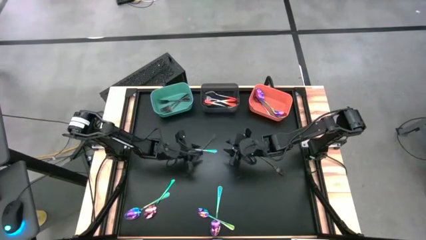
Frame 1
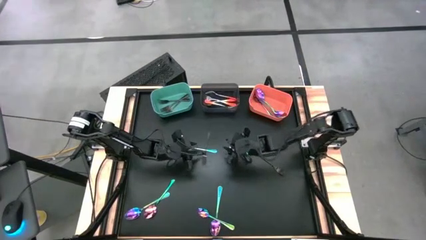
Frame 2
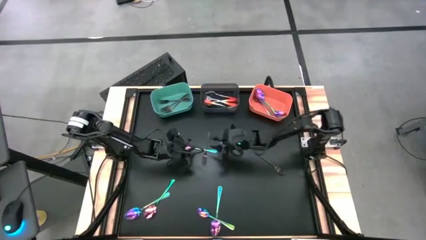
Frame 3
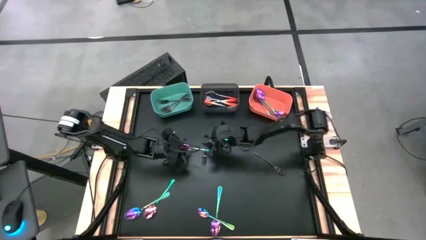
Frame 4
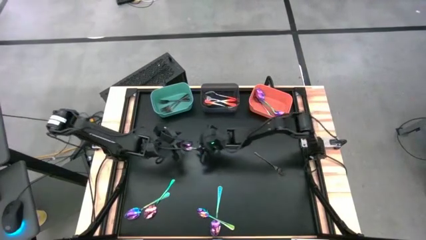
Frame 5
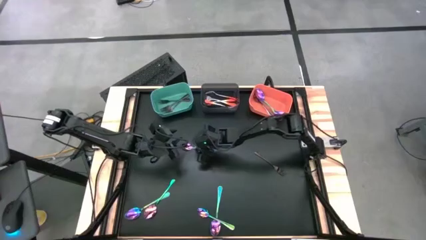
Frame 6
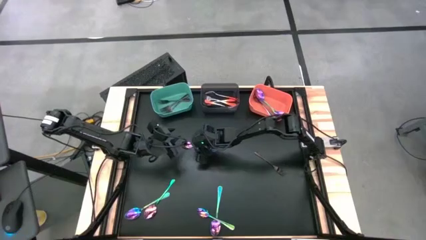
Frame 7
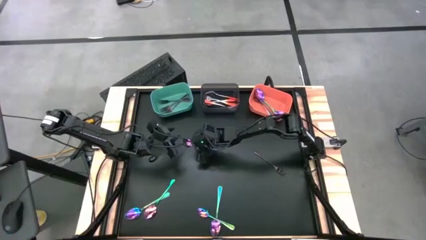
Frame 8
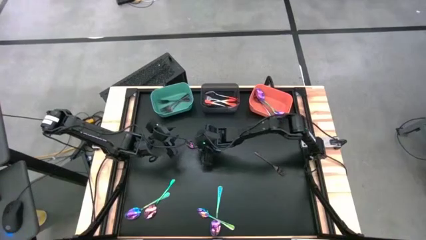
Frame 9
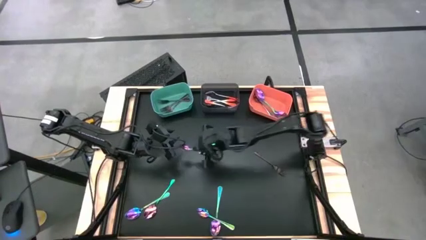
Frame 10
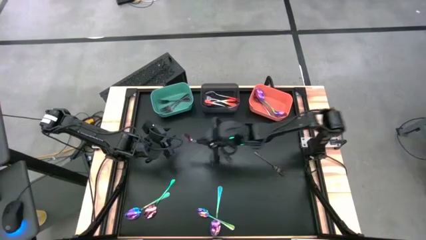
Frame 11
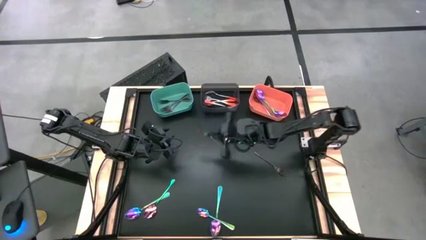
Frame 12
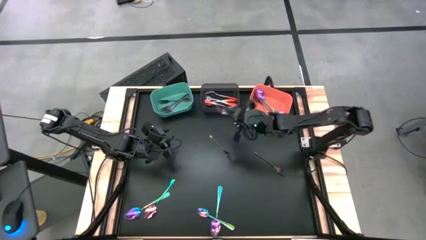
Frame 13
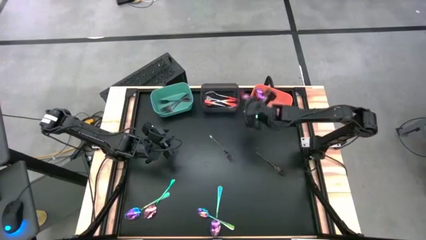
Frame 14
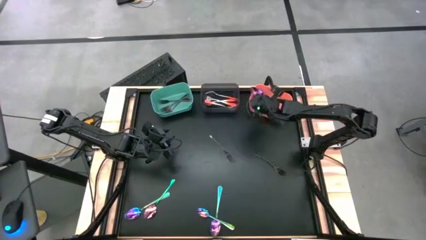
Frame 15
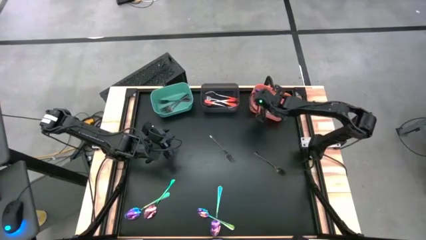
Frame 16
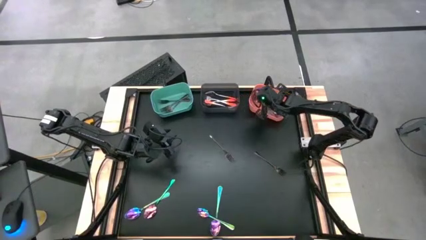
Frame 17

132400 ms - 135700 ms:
Task: Sort silverware by color (type)
Put the blue spoon into the orange bin

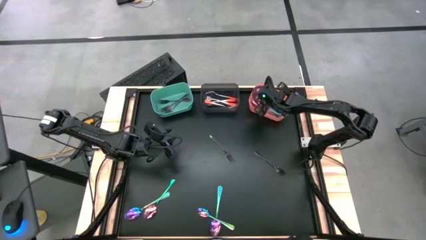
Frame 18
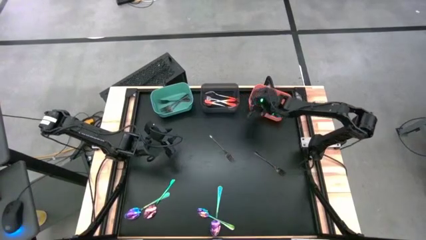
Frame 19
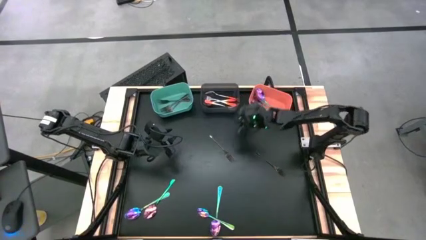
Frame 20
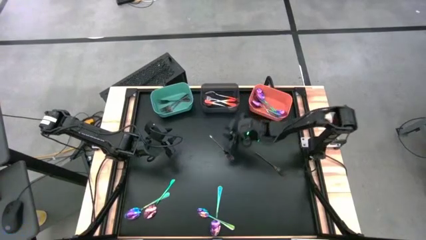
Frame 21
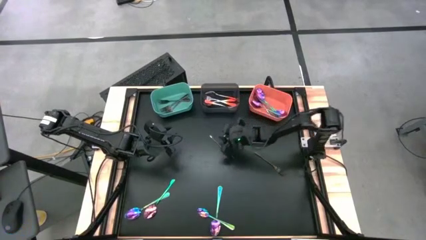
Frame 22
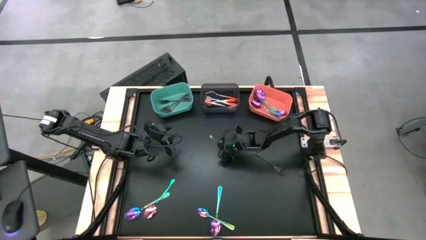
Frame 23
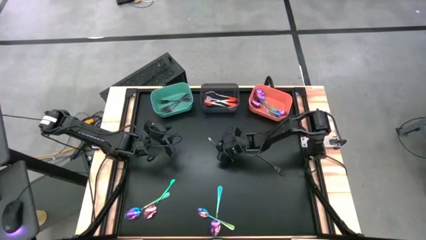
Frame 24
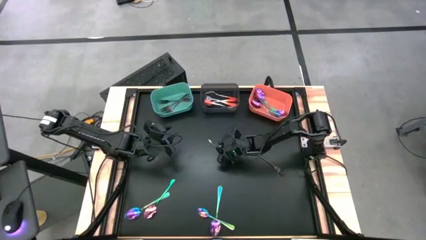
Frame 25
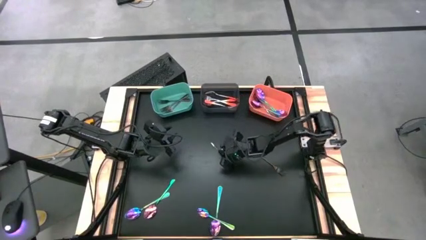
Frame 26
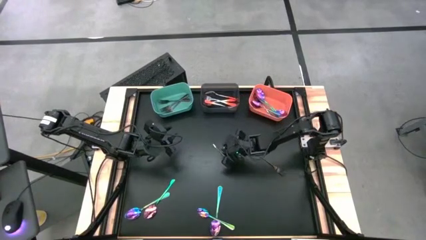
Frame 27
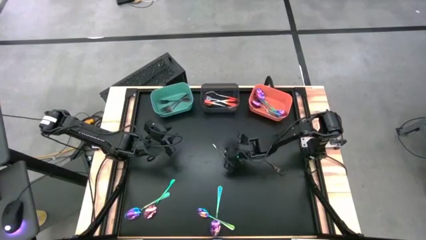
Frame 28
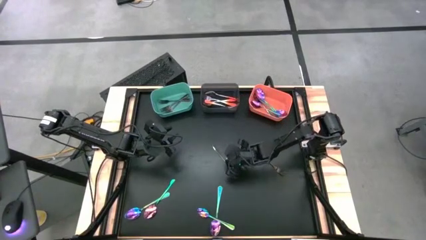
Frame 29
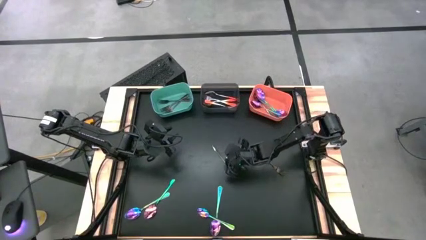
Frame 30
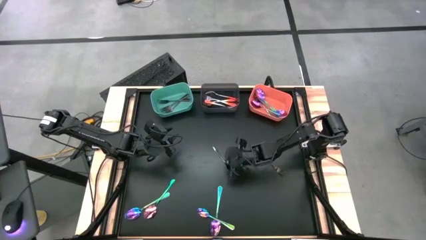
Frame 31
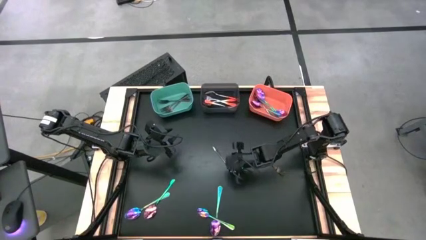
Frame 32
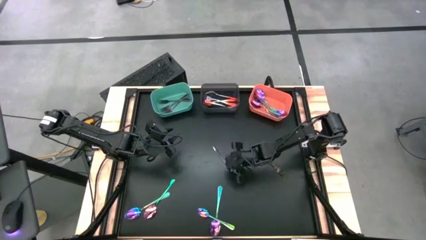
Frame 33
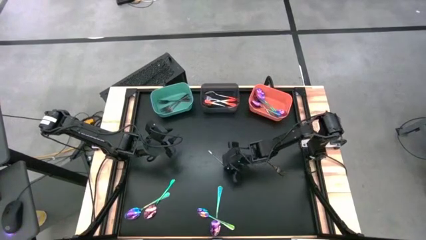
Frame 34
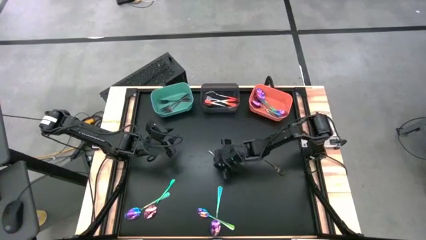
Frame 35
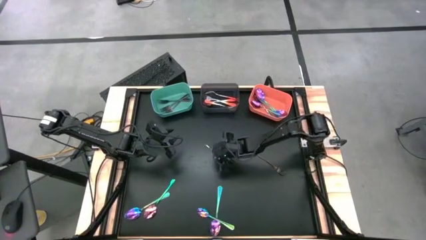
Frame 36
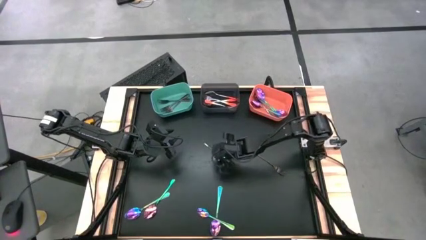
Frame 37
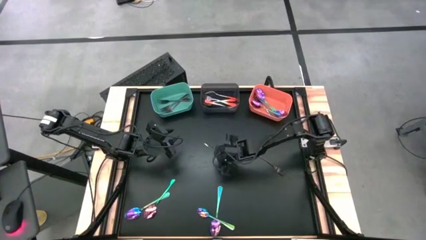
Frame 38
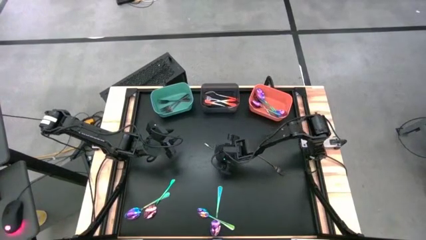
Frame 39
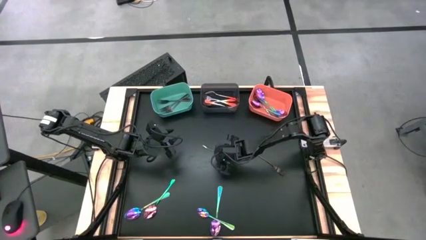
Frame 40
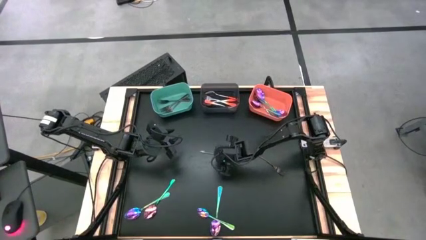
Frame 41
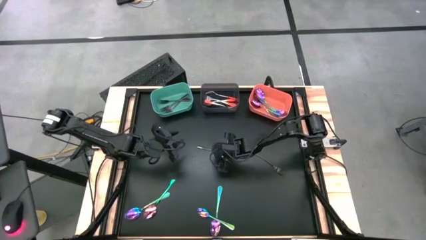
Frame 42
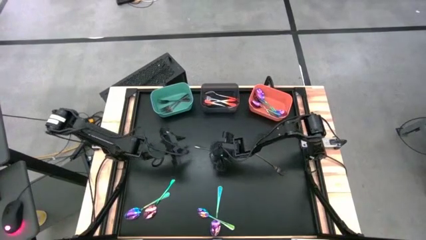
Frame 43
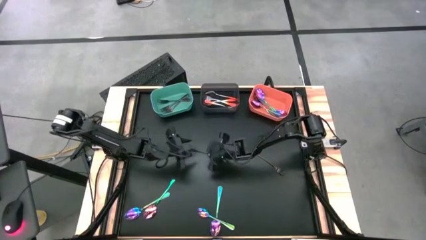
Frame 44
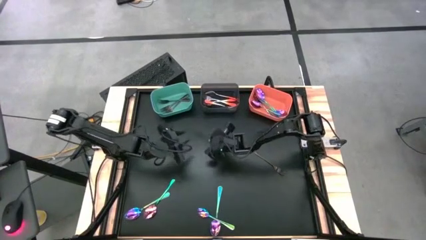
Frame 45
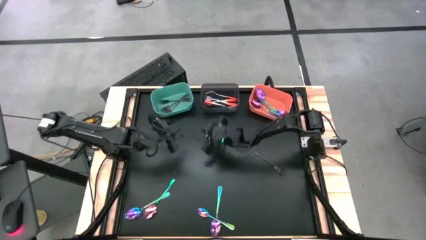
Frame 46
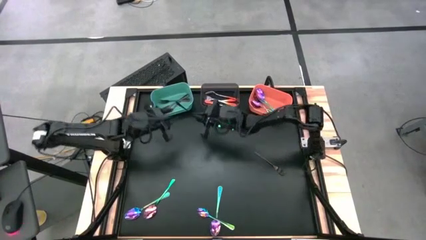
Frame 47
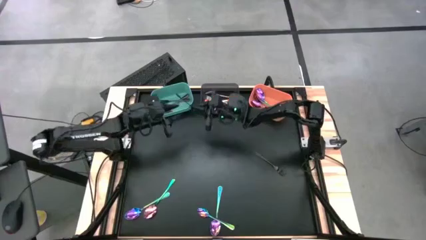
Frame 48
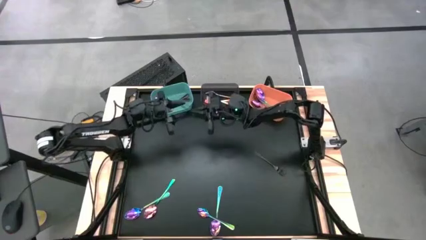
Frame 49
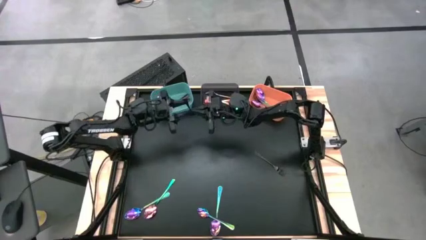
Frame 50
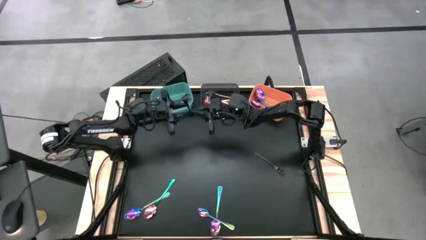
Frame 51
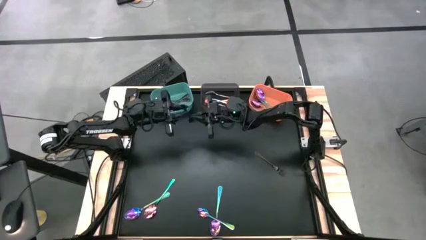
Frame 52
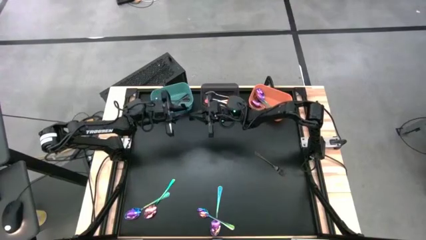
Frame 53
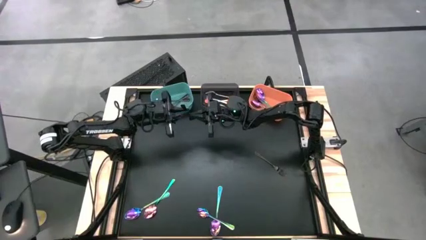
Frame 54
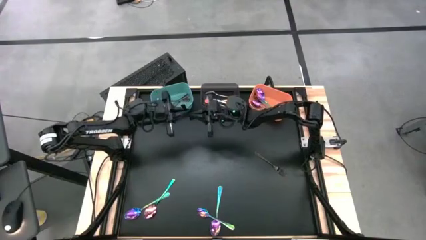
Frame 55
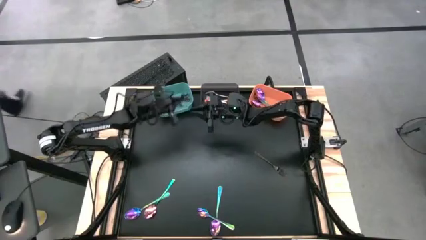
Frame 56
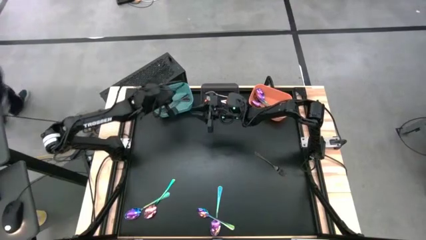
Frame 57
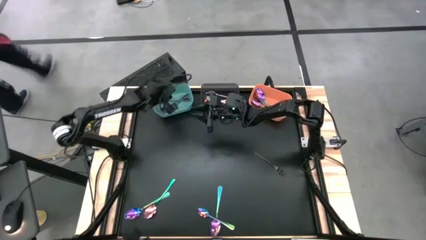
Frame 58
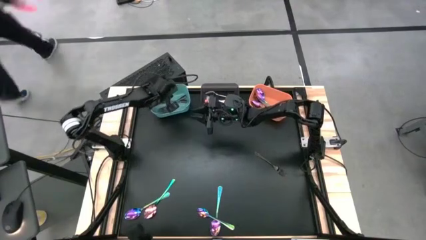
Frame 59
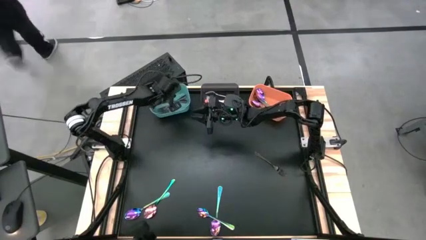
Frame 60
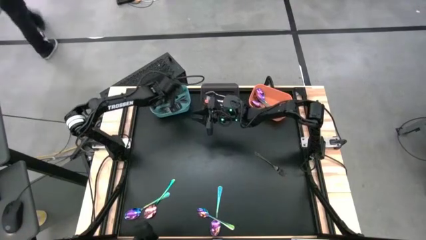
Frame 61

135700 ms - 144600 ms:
Put the black fork into the green bin

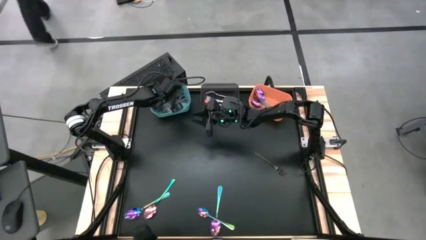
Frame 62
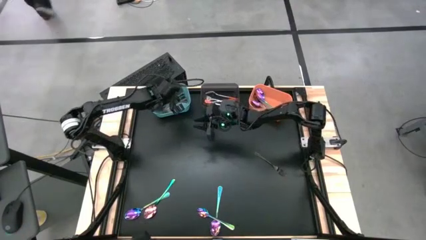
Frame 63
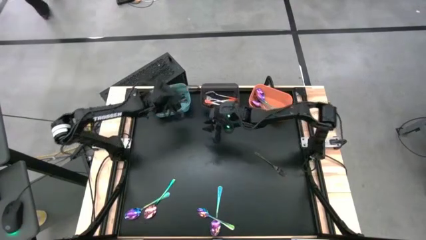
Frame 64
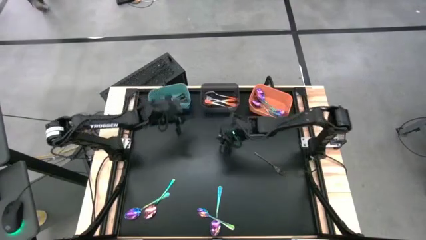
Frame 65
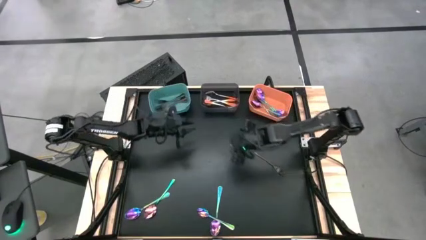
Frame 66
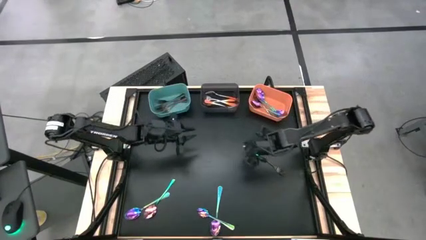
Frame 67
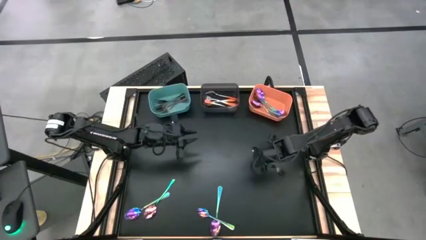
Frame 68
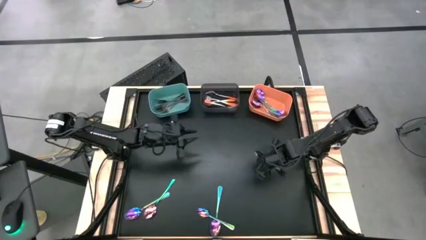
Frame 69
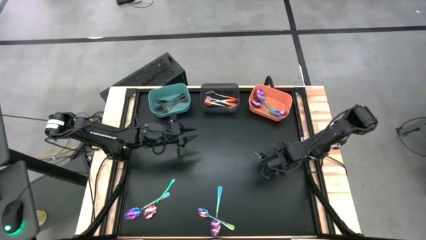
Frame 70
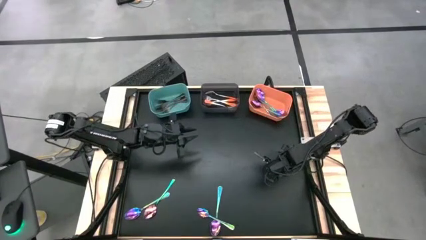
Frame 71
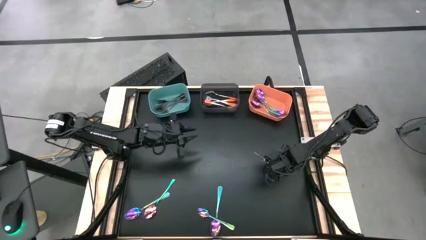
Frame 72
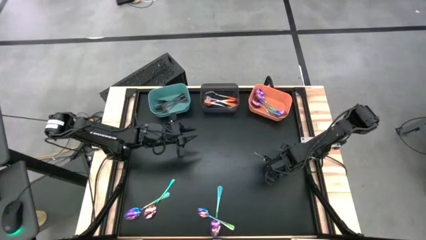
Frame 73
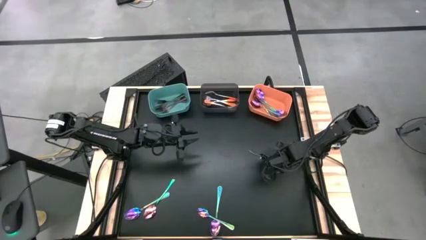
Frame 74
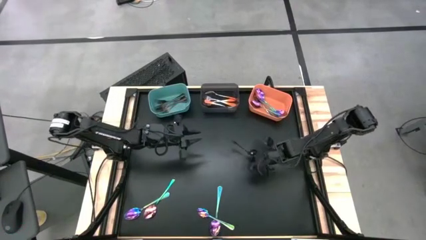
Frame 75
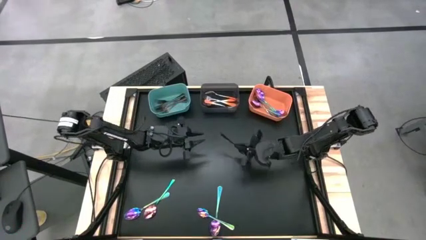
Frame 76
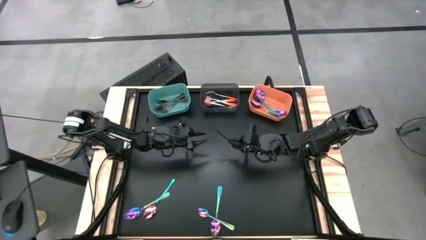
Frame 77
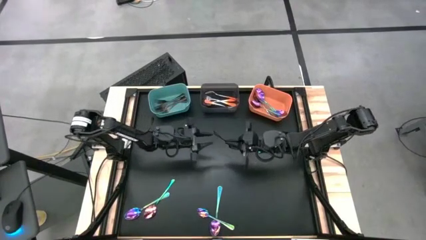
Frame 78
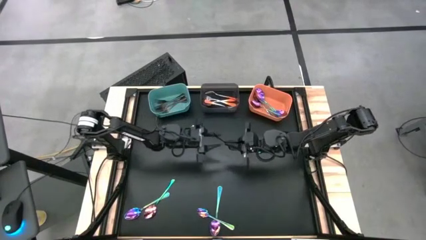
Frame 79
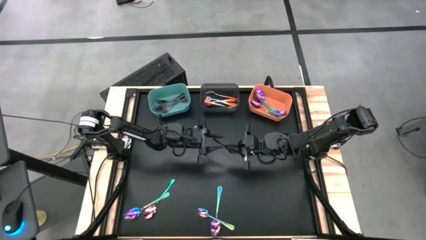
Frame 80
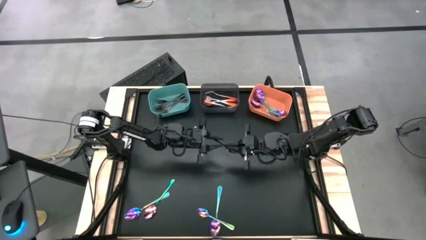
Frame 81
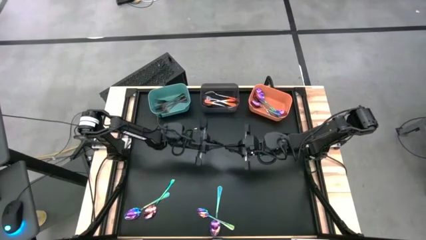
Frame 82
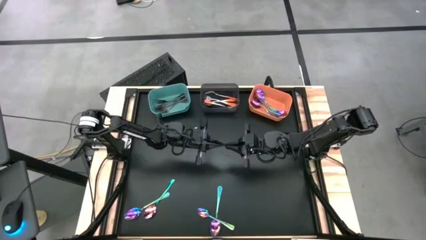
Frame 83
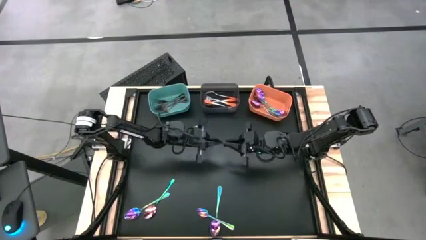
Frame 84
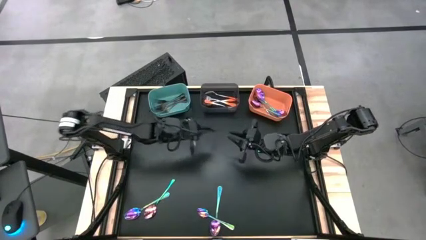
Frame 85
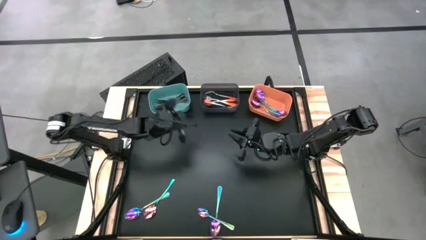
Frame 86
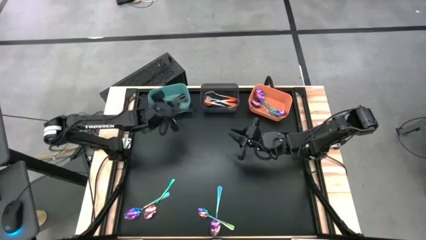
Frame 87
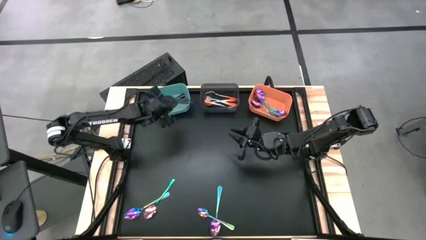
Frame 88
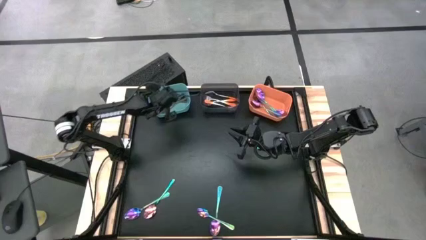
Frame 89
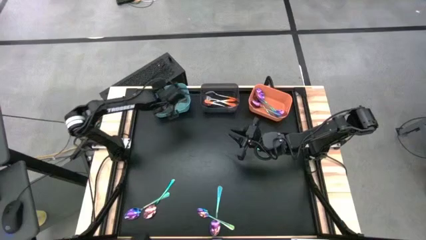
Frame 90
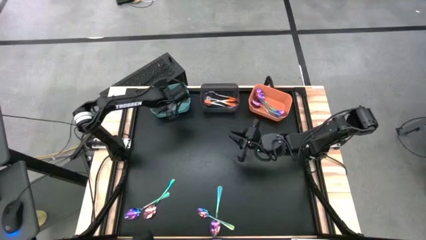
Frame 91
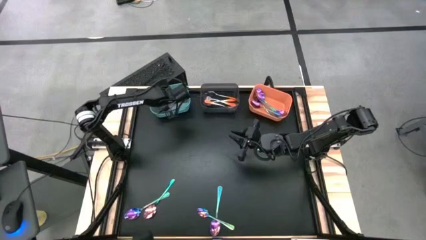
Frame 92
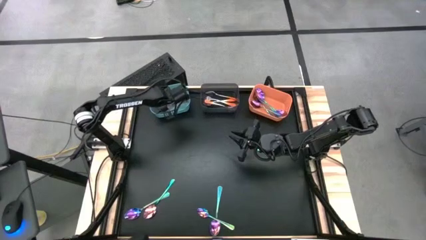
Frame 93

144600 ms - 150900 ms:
Put the black fork into the green bin
